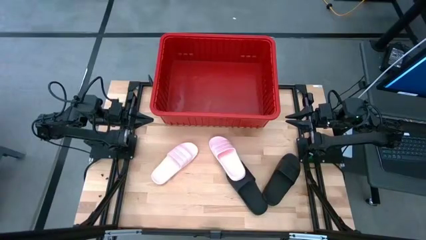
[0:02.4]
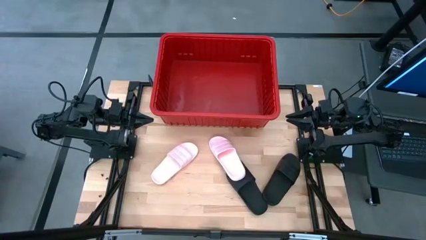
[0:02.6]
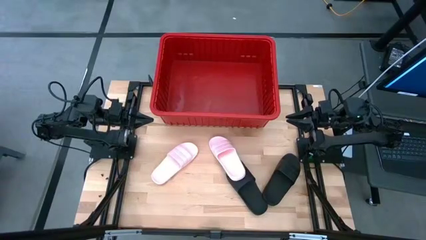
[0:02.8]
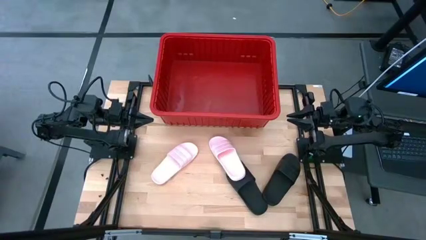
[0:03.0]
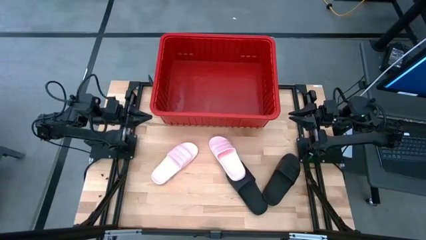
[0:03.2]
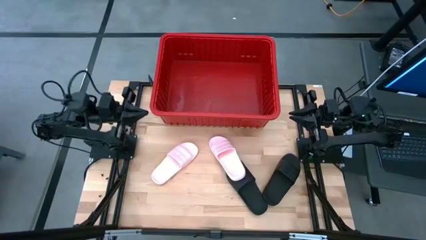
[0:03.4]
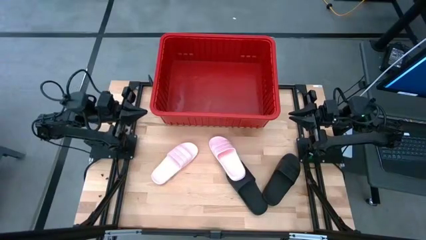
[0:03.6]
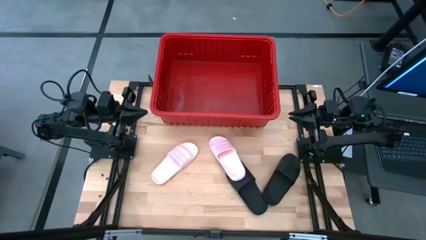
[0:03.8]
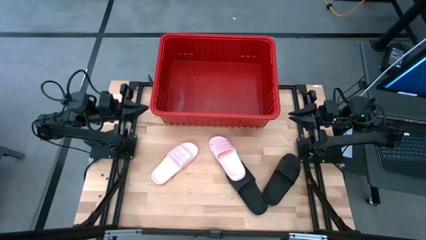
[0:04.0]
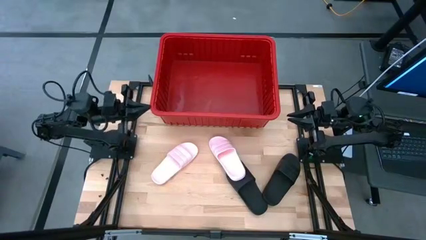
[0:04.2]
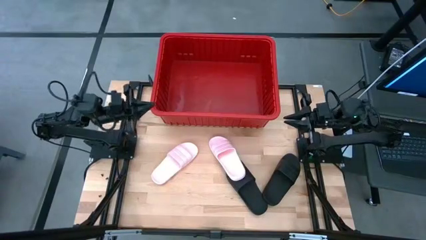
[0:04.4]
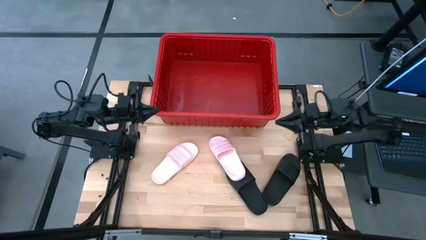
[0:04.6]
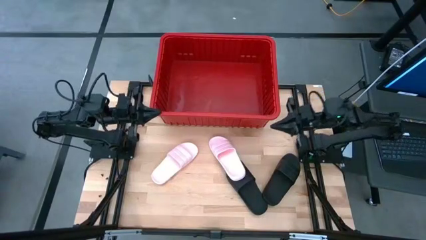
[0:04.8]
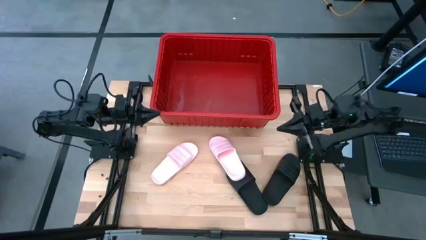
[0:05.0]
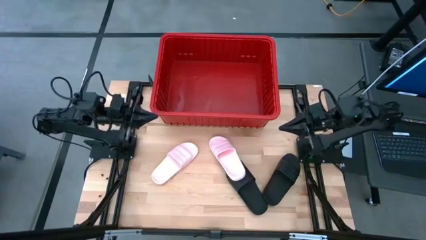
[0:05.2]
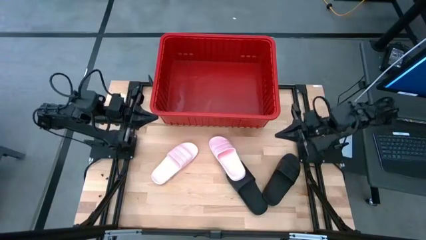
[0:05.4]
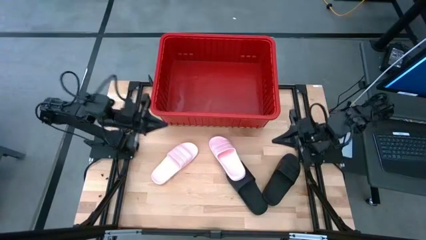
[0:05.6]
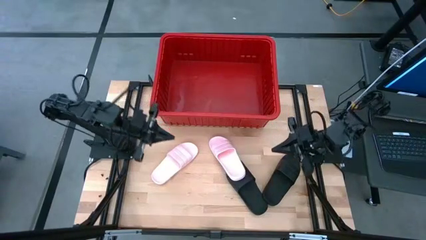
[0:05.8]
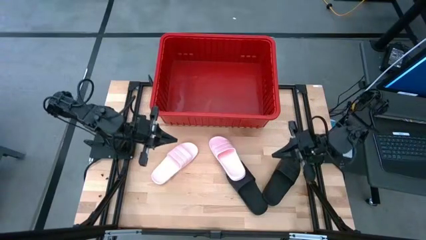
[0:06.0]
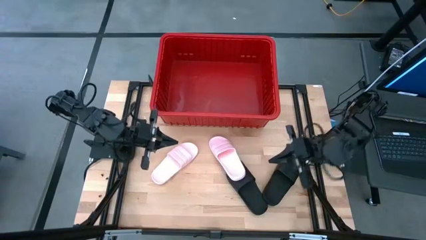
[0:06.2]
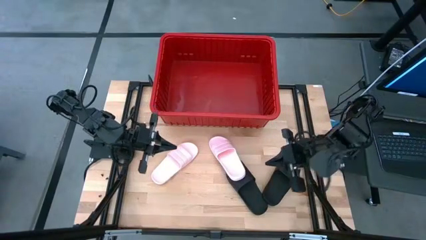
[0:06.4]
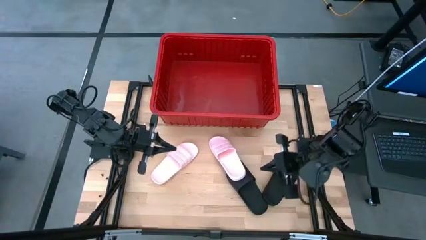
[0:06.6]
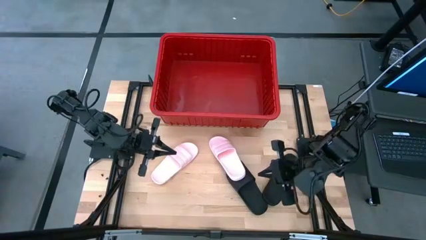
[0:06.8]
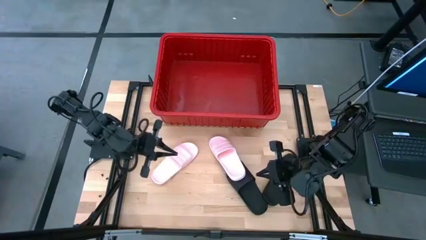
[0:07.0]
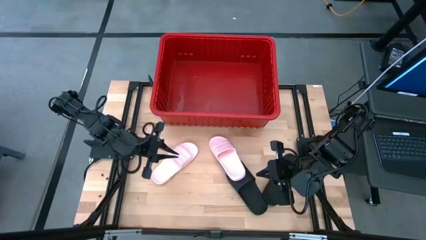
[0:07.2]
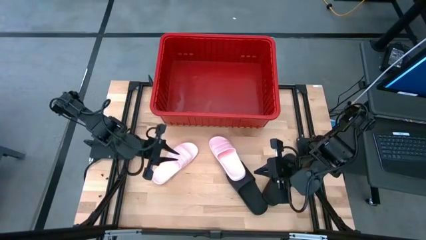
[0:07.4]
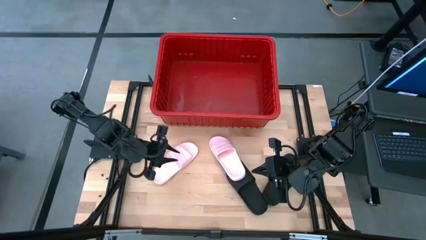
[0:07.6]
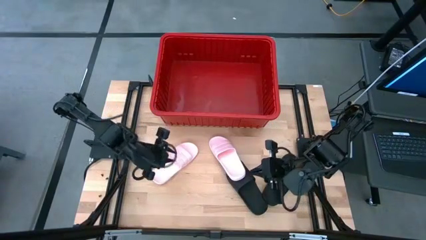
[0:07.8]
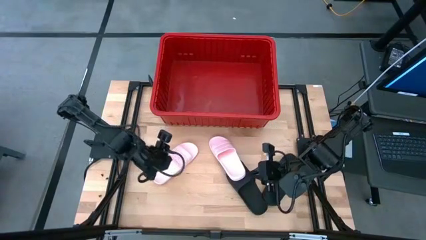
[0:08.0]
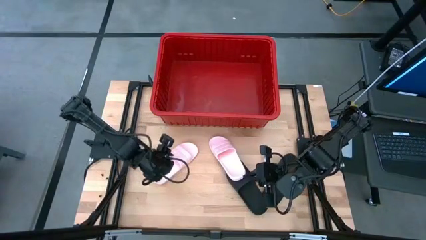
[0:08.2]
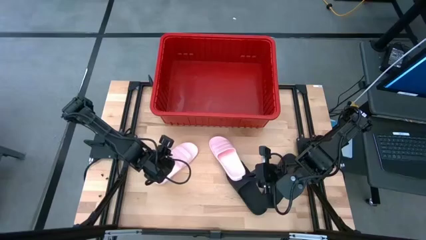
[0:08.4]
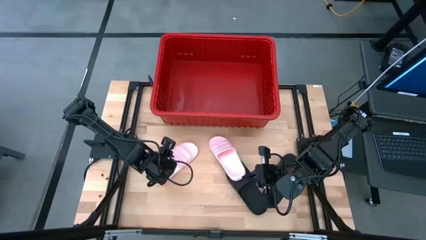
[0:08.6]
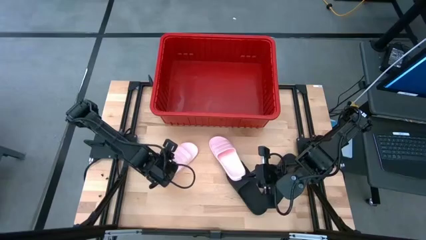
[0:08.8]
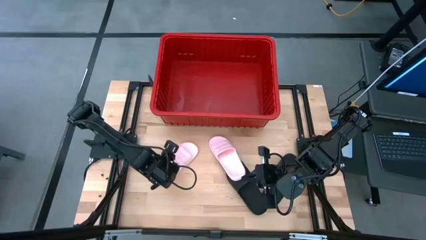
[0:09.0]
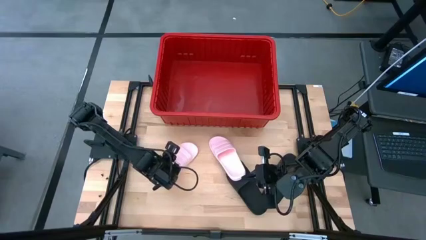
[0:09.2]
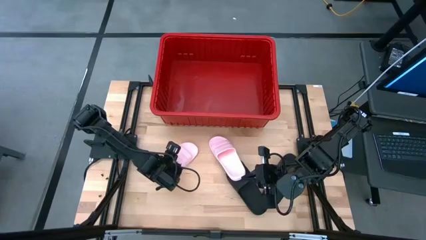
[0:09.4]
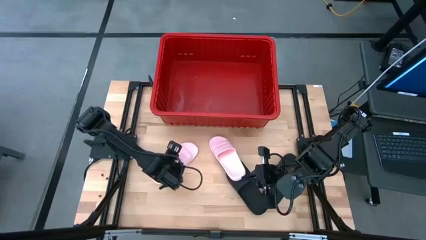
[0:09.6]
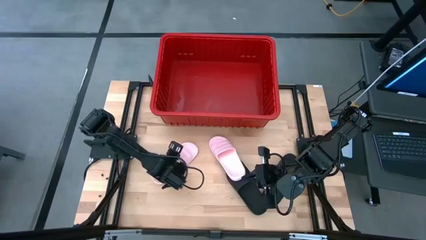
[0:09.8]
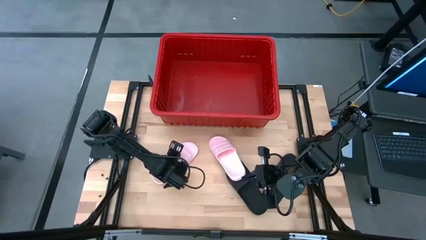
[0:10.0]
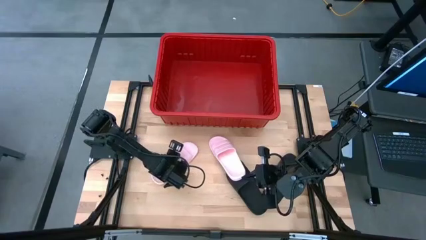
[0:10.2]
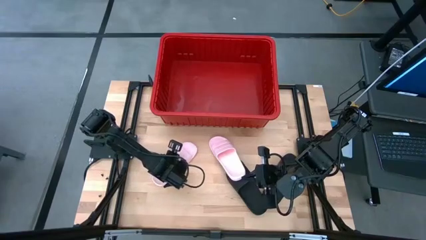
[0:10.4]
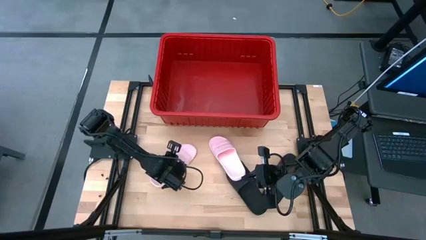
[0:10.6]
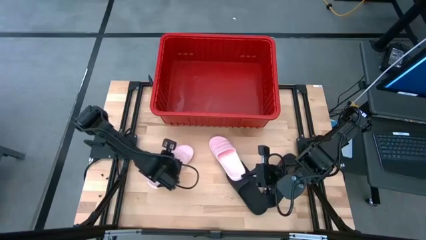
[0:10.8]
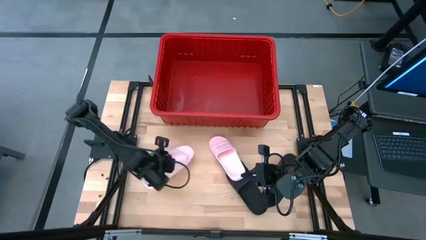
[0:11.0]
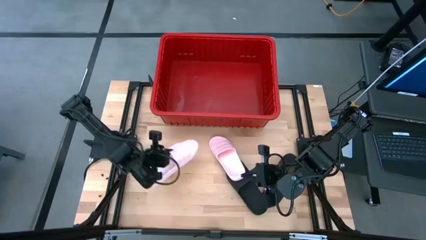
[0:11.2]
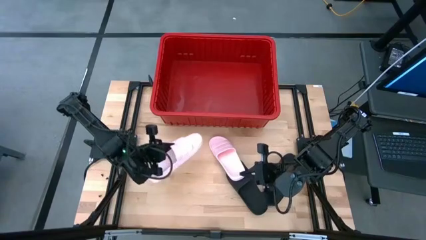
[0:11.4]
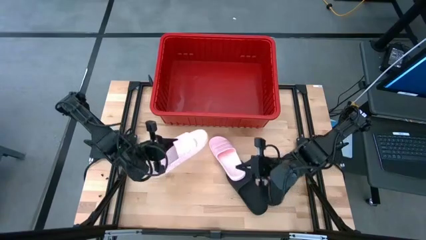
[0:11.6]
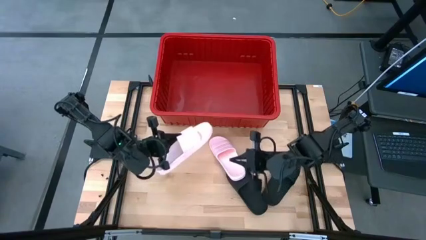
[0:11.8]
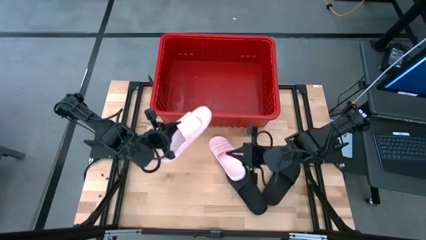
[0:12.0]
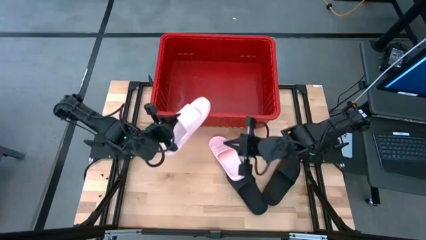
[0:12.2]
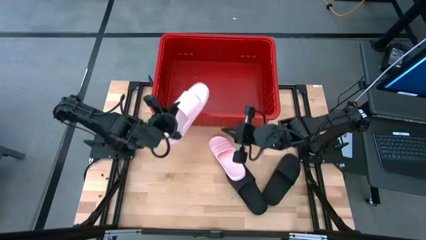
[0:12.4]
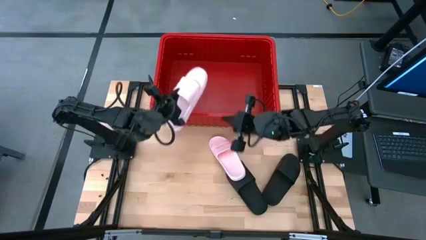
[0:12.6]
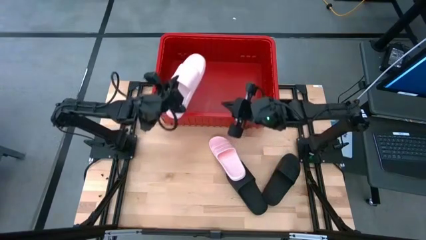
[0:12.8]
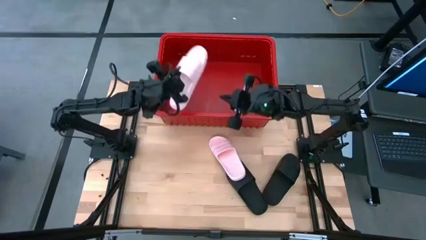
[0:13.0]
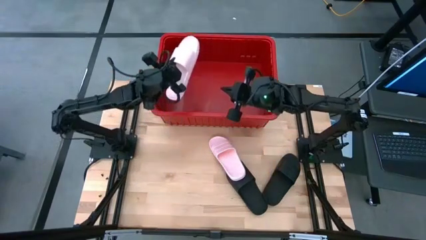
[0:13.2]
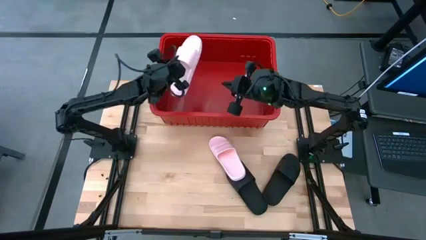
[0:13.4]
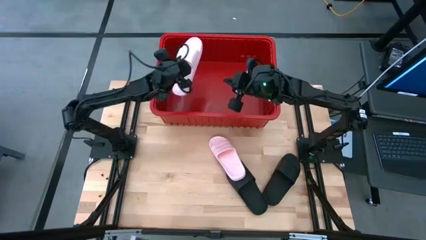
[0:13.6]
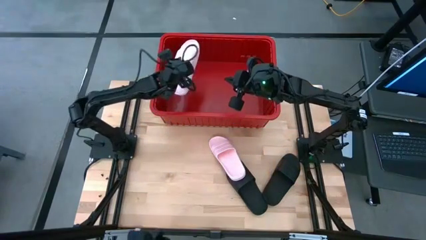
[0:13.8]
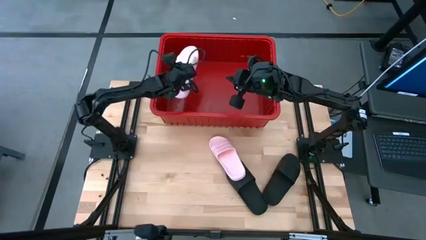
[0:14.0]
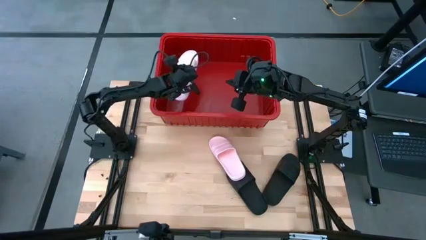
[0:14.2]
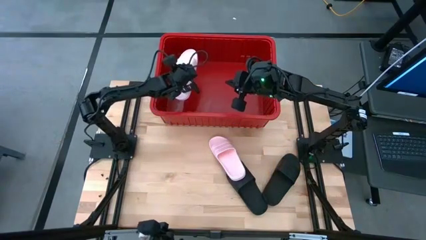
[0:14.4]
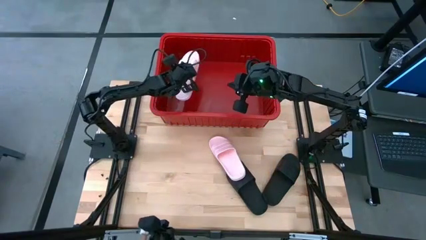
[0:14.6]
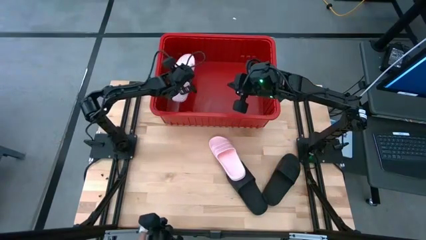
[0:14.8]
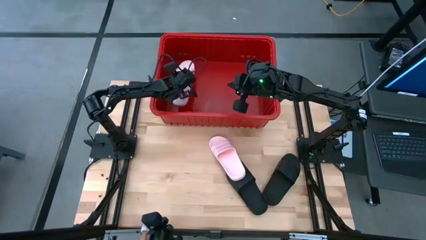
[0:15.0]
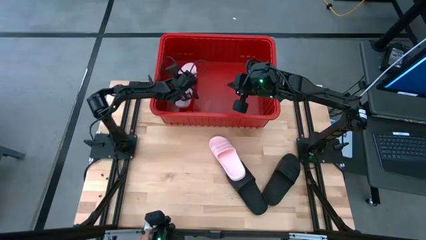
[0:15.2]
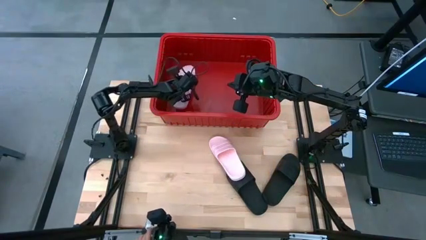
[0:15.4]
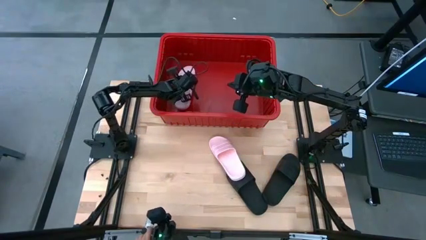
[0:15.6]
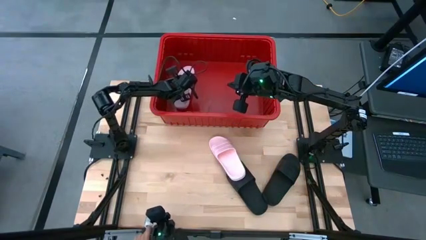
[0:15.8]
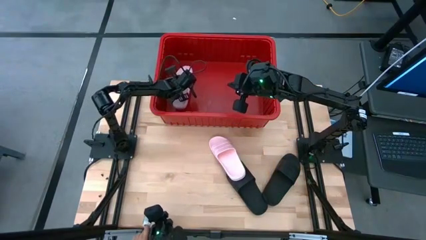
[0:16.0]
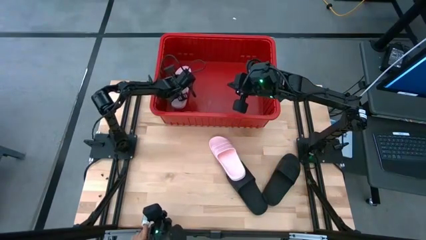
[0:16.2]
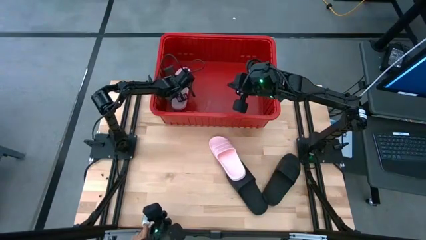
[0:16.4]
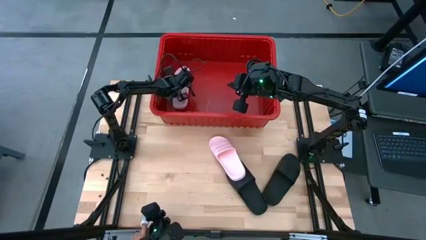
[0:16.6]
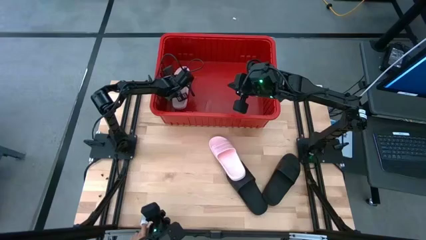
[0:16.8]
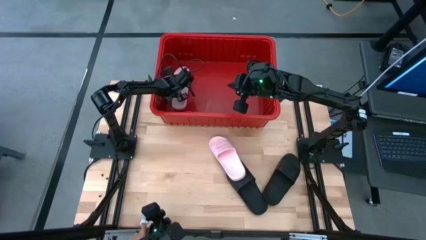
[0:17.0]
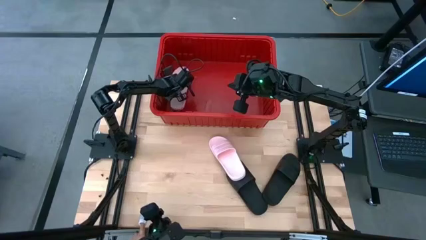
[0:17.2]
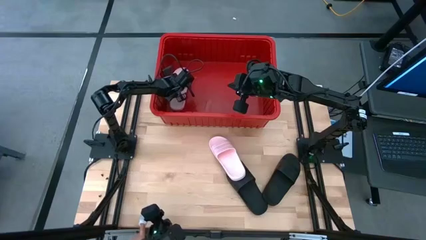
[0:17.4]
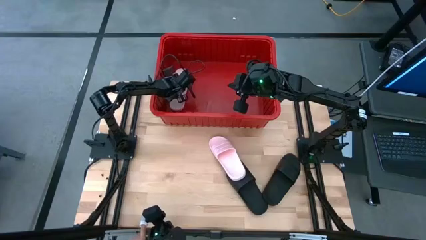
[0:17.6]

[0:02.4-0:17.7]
Task: Pick and place slides into bin
Put the left pink slide into the red bin
